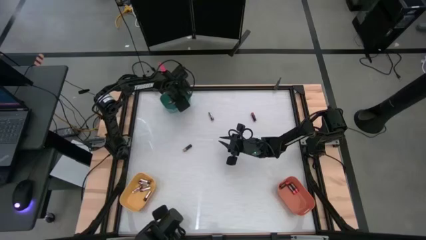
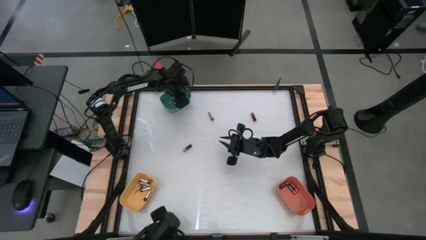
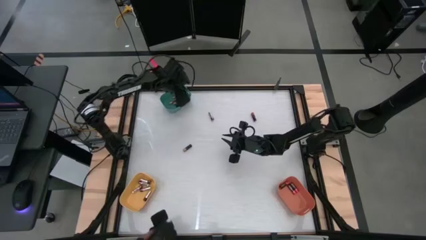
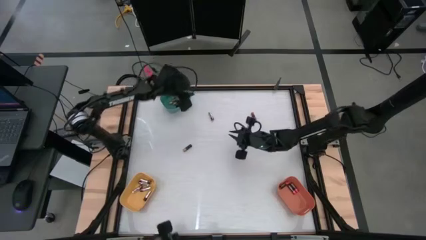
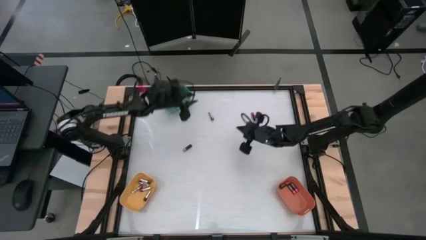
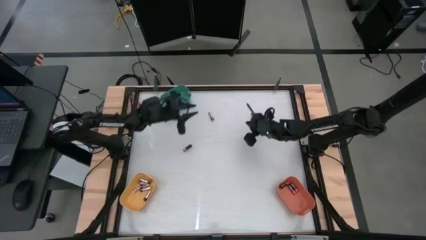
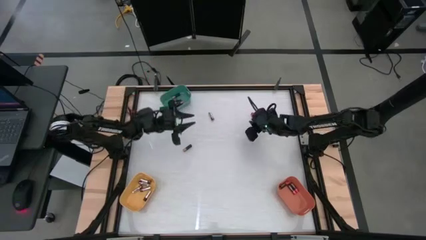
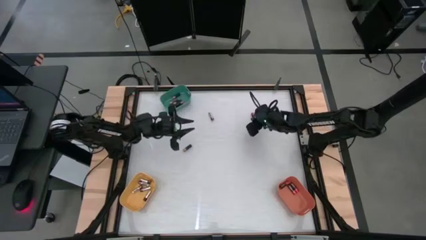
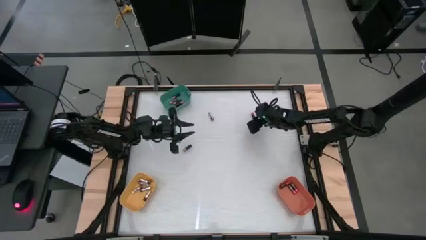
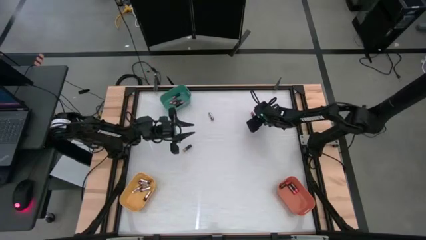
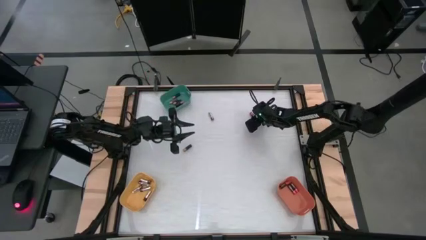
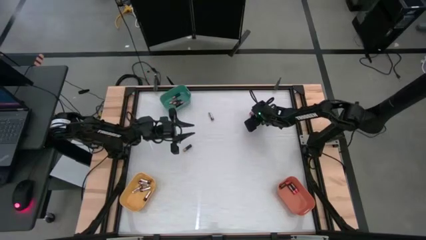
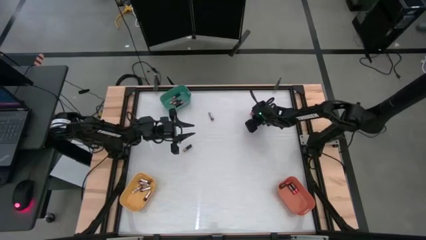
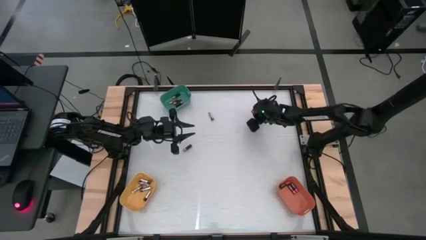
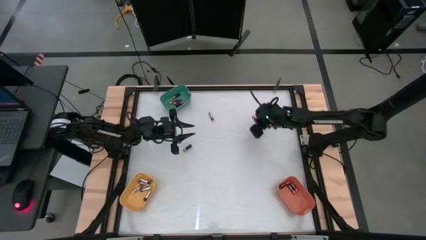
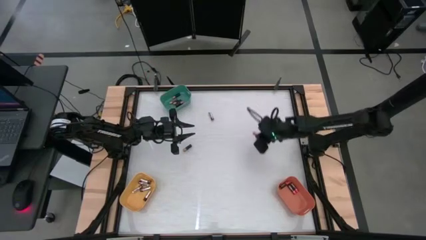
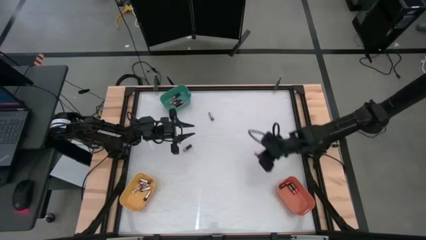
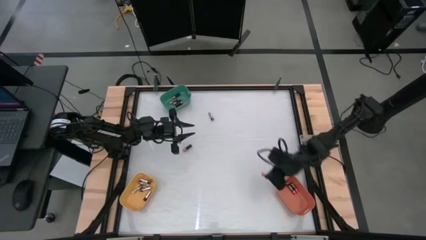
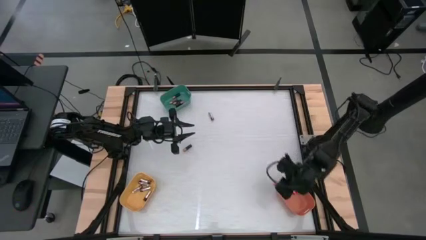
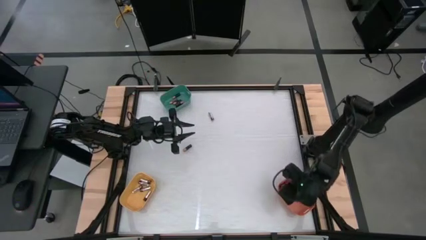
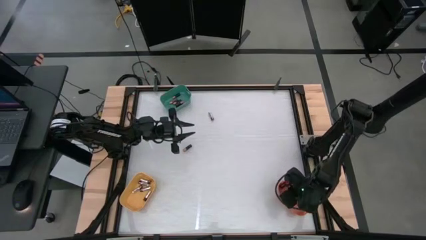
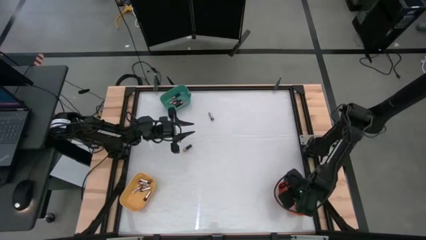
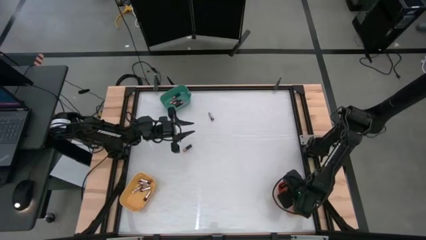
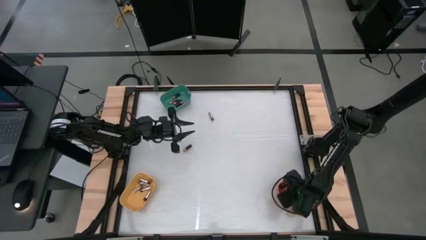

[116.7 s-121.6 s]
Task: Sort batteries
Put the red battery into the orange bin

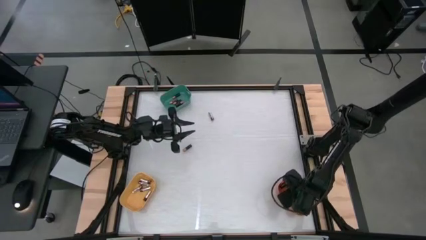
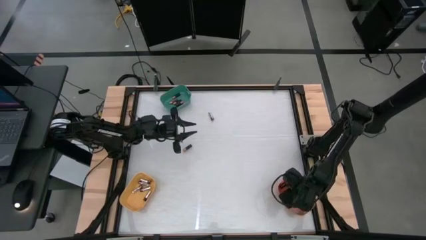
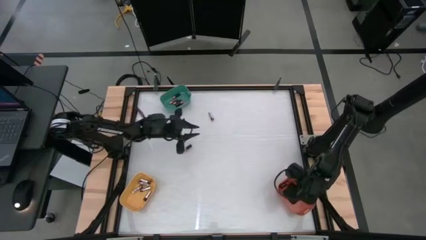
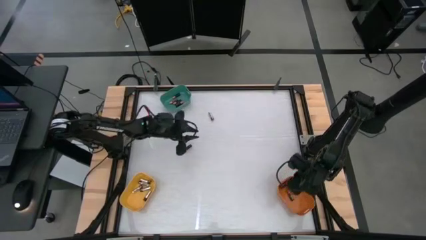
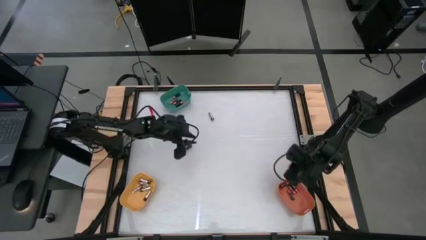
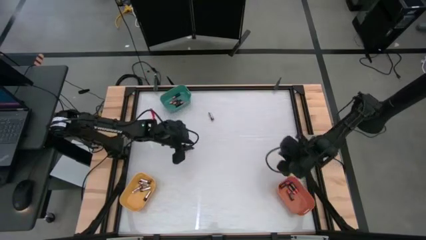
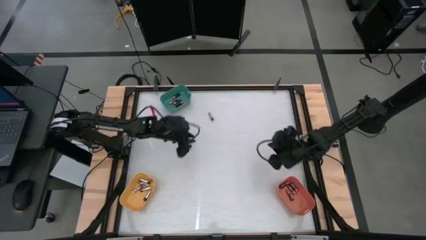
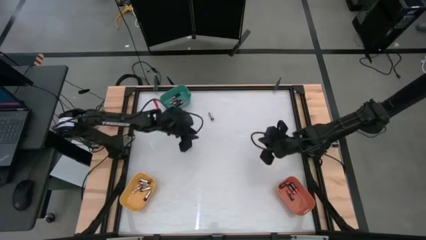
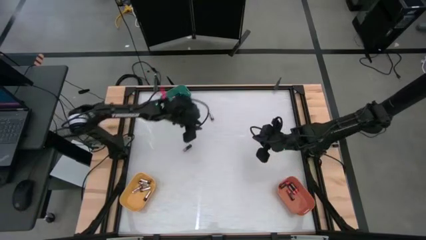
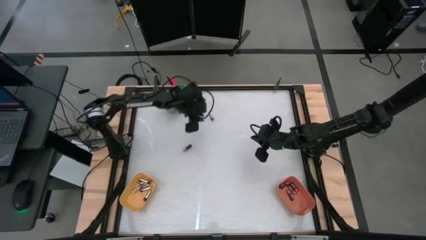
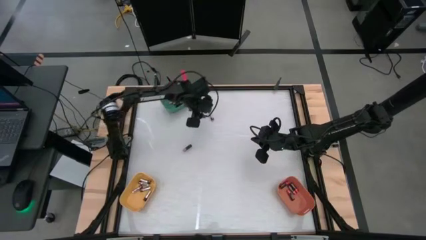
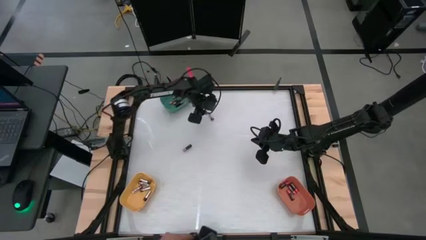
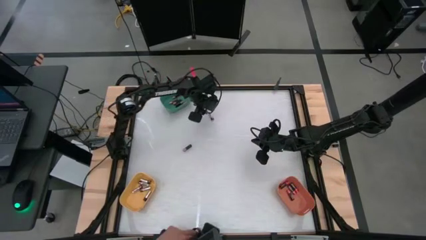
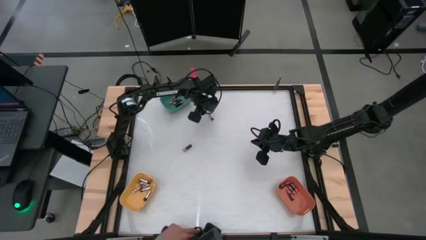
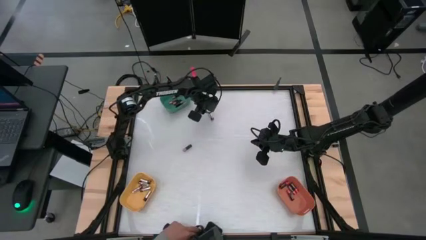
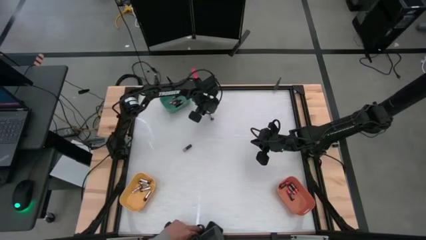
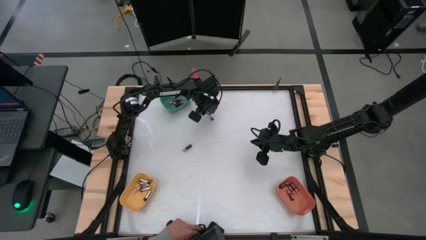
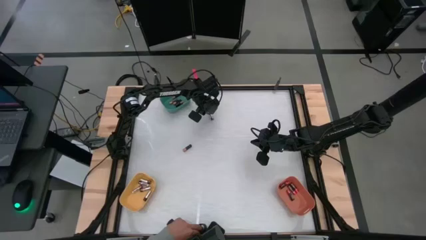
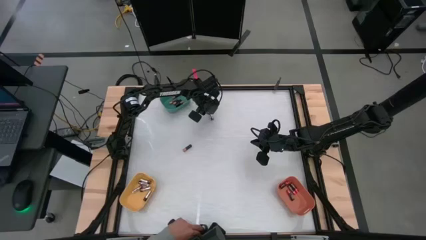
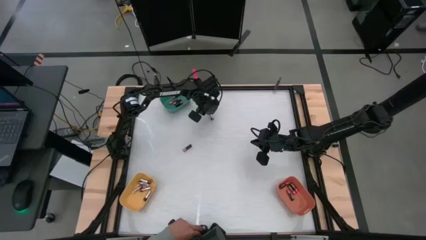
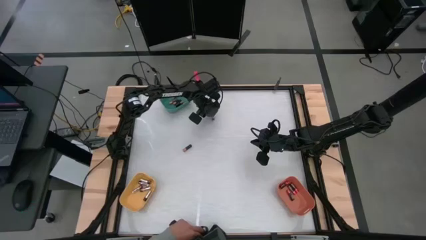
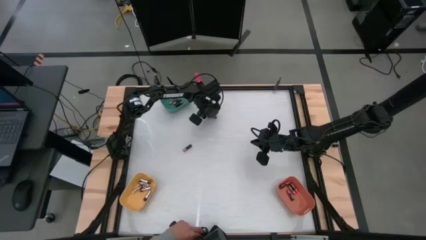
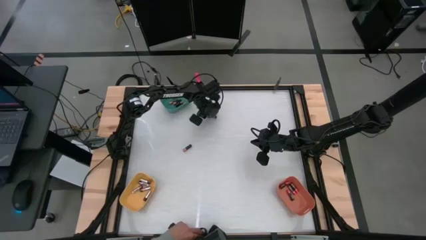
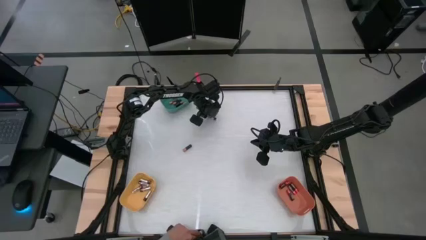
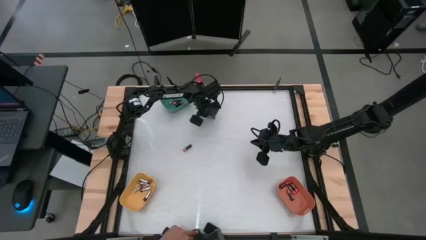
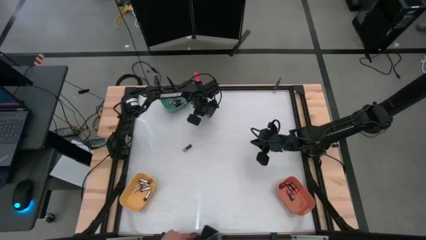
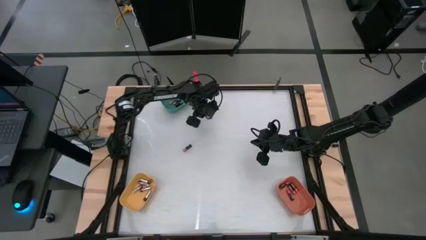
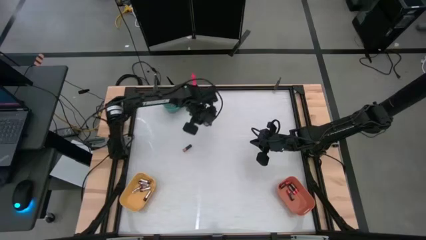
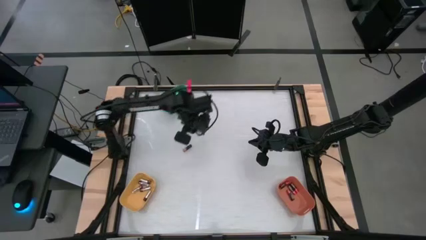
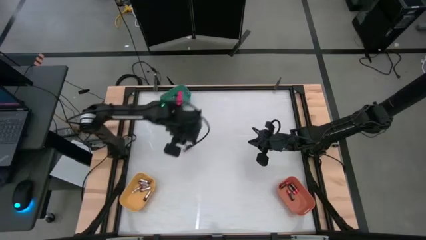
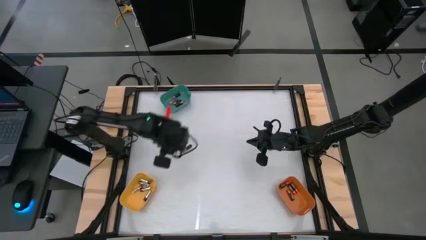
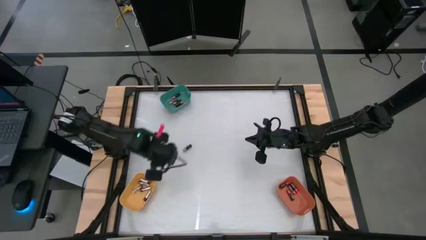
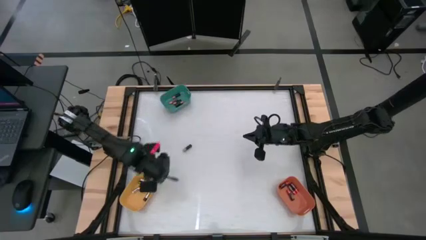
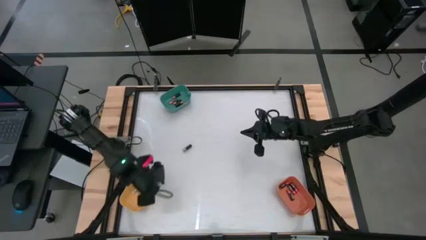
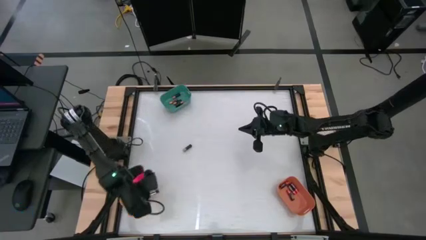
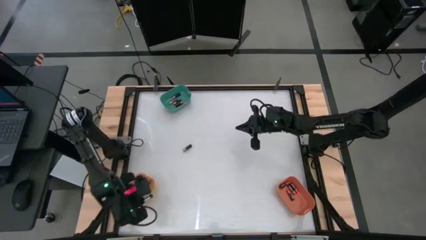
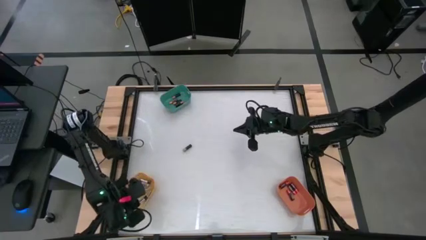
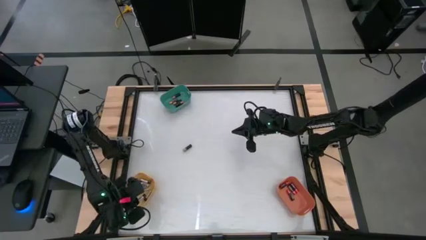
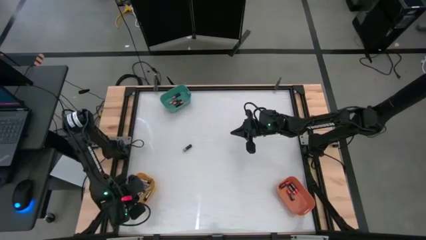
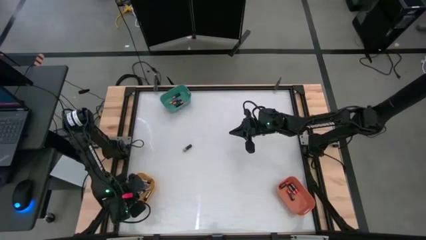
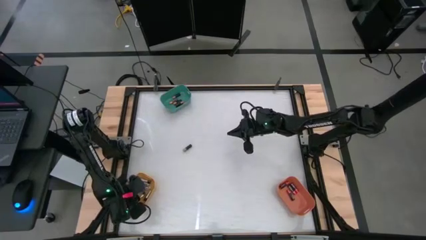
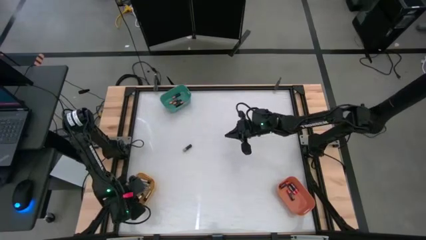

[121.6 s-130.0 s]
Put the silver battery into the yellow bin

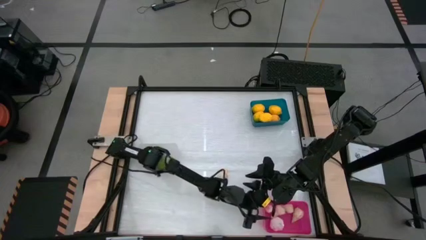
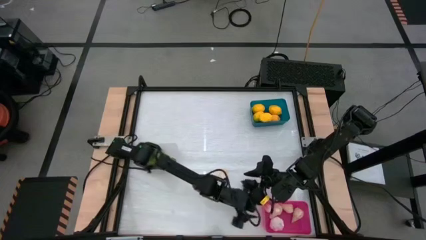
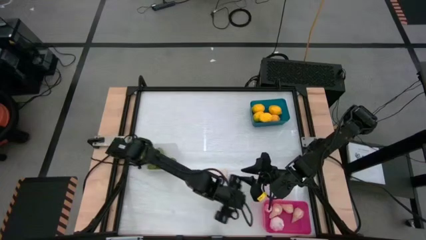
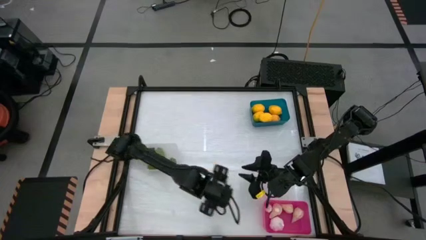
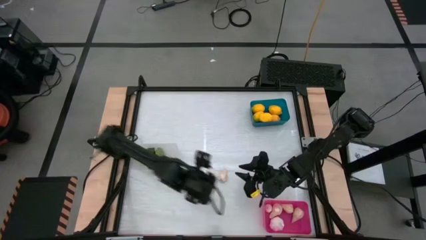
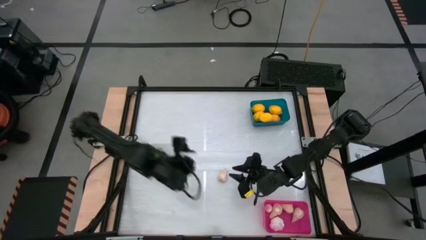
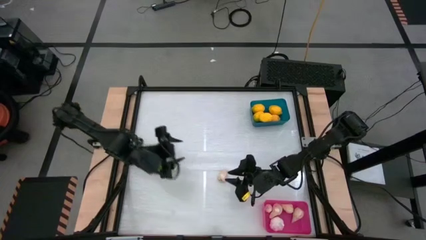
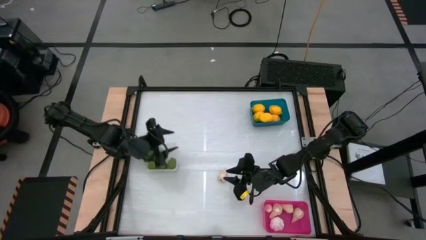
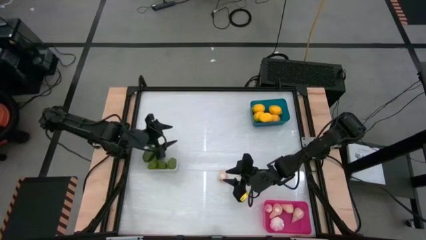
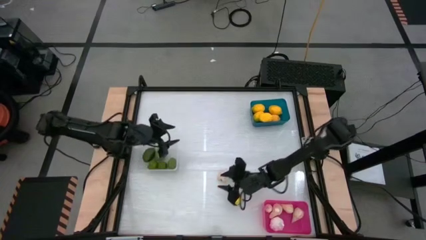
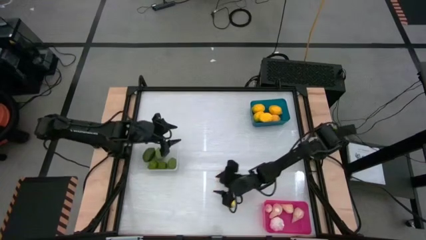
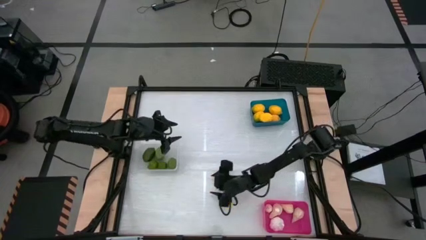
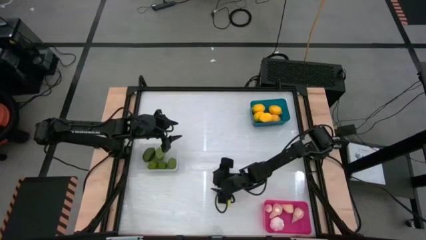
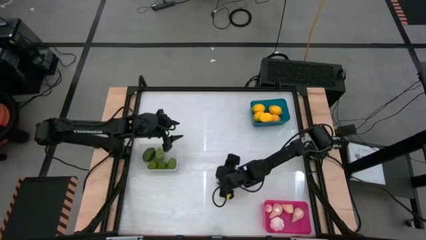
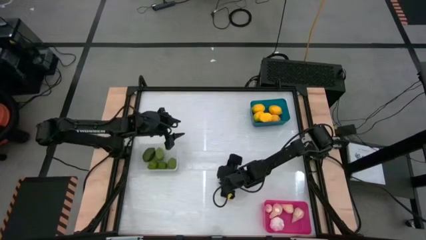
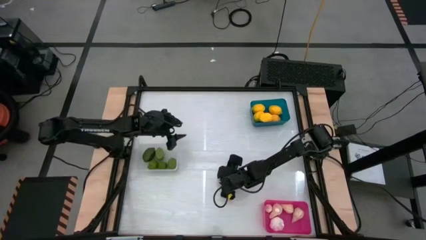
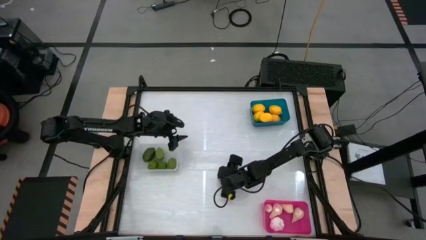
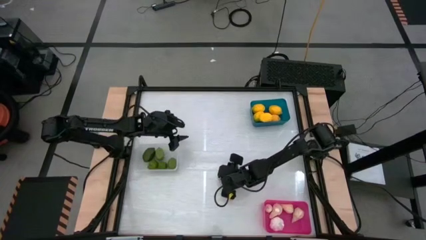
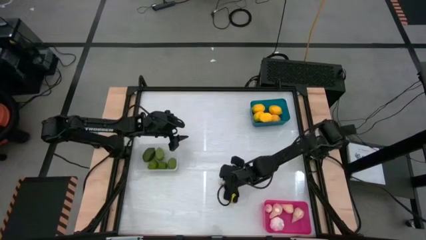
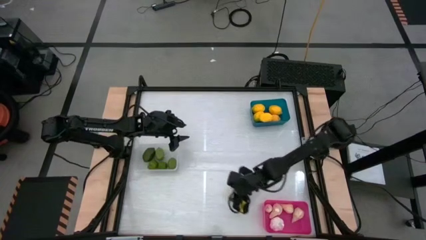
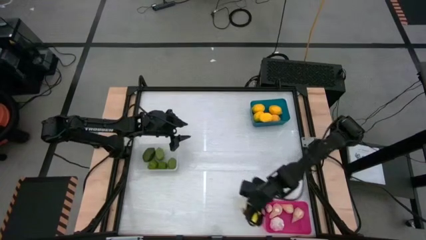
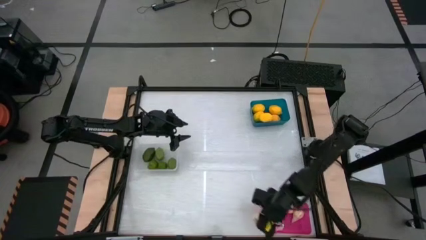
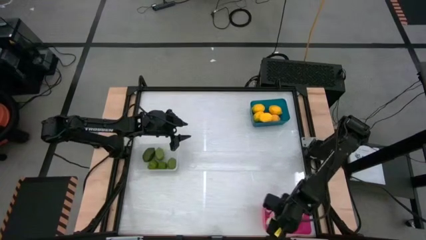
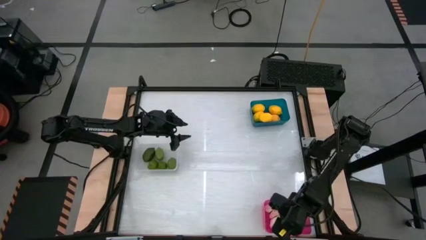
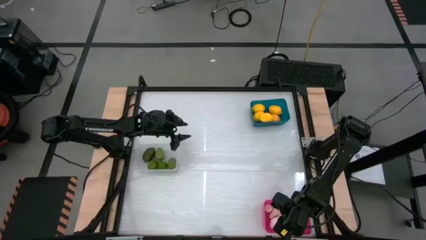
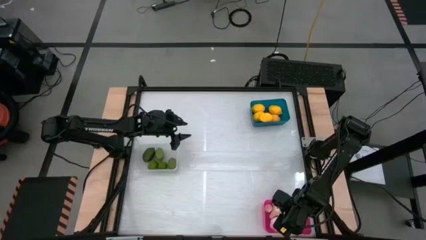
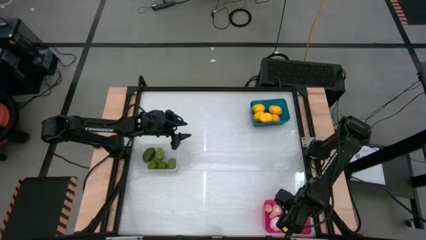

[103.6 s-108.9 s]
Task: Sort produce into baskets
Put the white garlic into the pink bin
